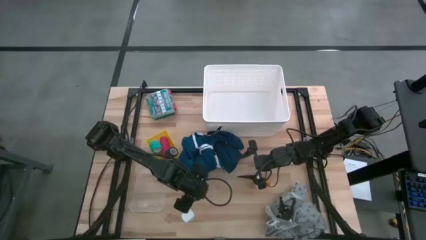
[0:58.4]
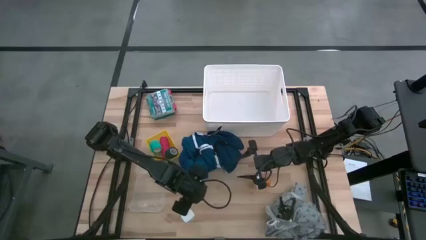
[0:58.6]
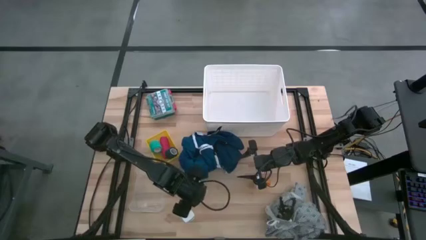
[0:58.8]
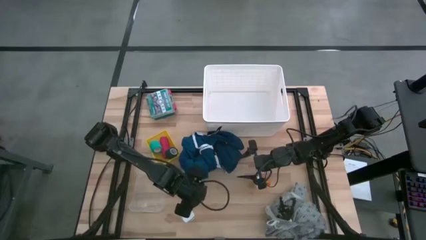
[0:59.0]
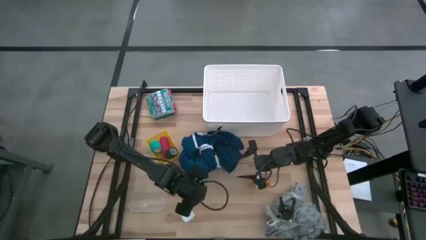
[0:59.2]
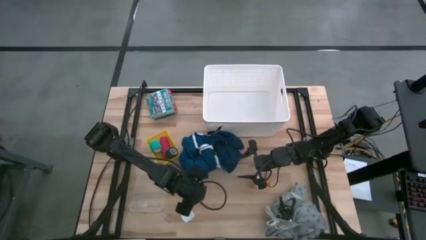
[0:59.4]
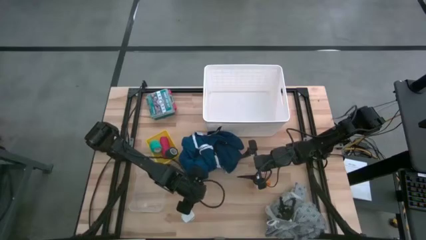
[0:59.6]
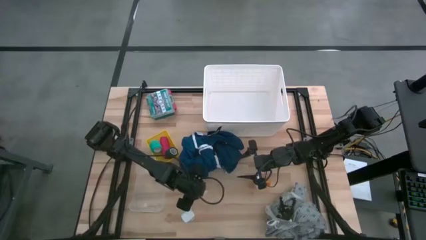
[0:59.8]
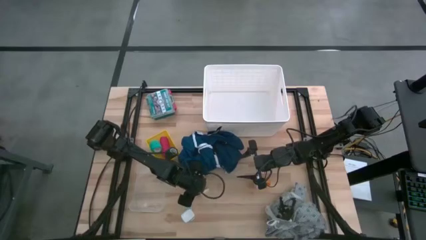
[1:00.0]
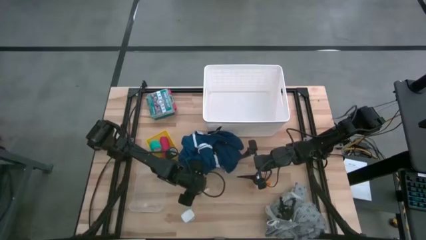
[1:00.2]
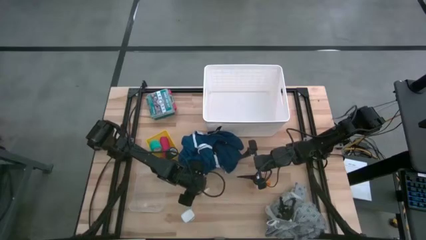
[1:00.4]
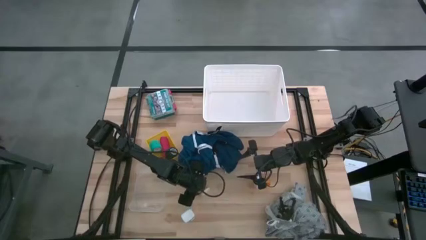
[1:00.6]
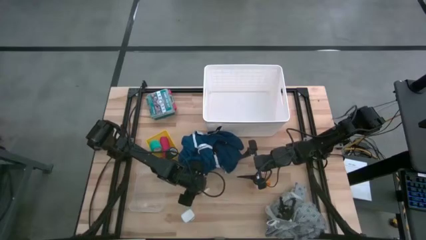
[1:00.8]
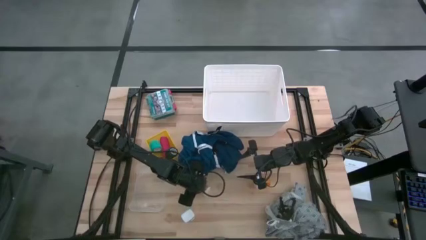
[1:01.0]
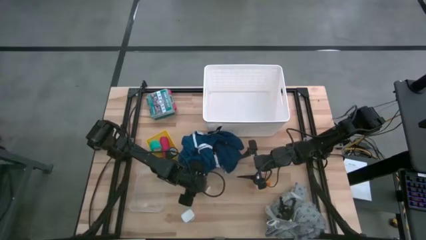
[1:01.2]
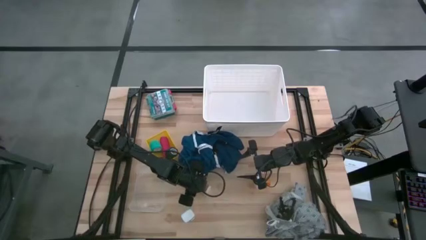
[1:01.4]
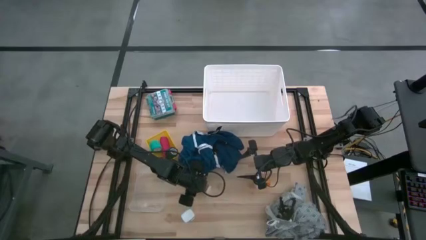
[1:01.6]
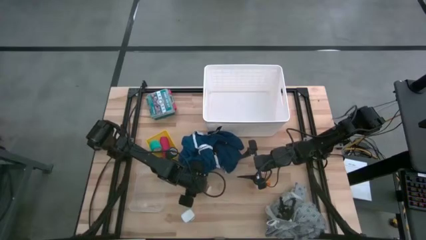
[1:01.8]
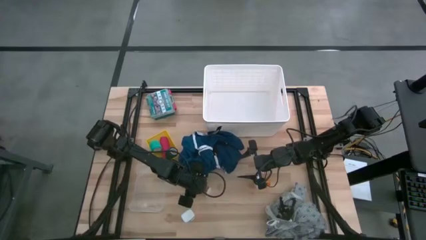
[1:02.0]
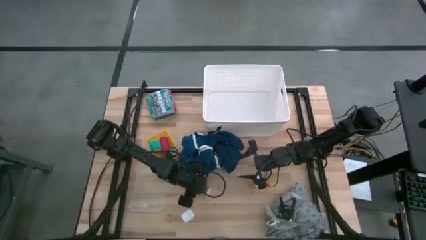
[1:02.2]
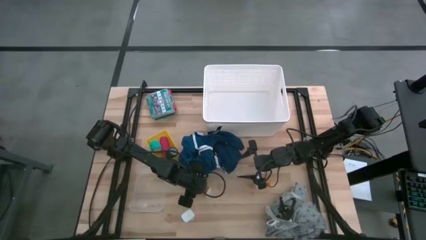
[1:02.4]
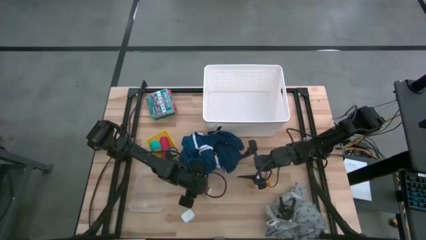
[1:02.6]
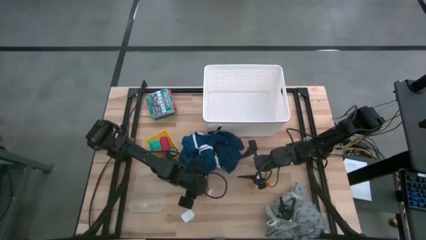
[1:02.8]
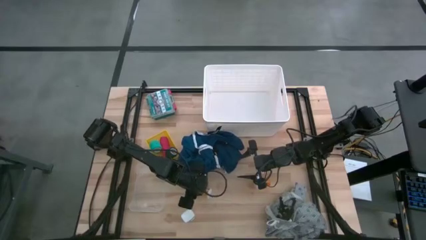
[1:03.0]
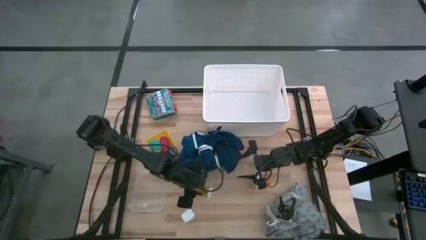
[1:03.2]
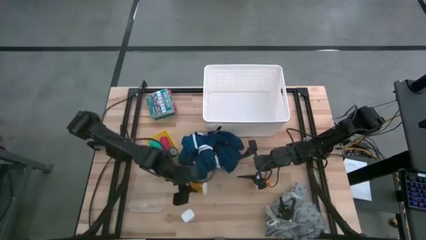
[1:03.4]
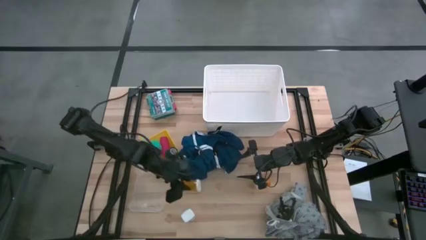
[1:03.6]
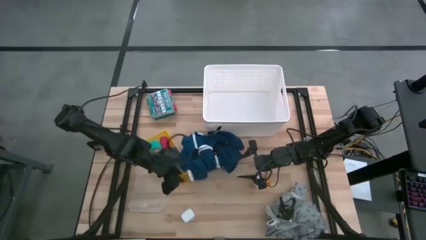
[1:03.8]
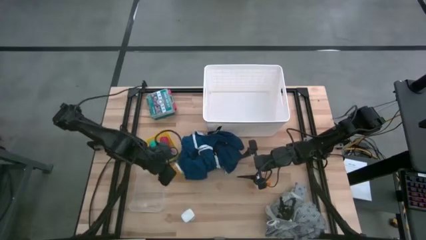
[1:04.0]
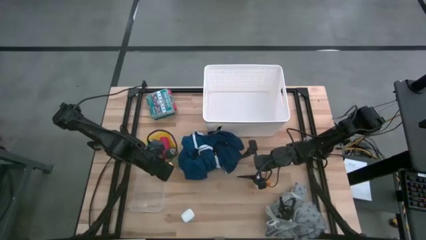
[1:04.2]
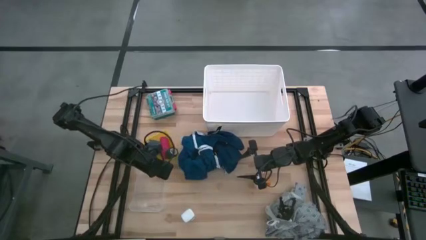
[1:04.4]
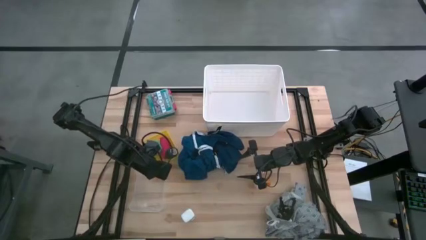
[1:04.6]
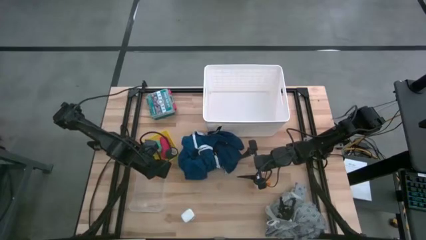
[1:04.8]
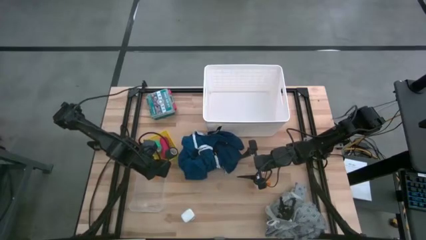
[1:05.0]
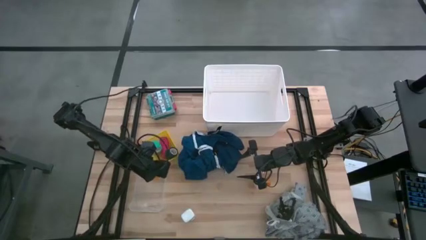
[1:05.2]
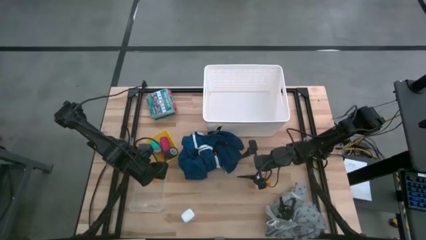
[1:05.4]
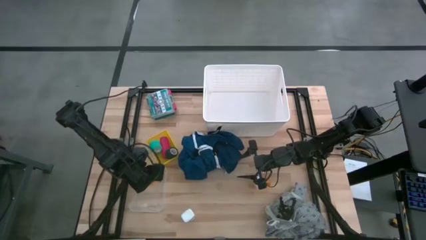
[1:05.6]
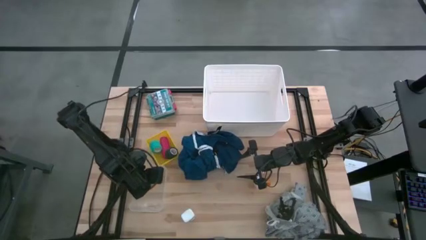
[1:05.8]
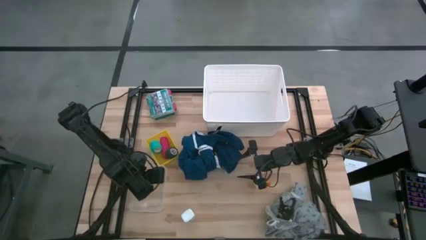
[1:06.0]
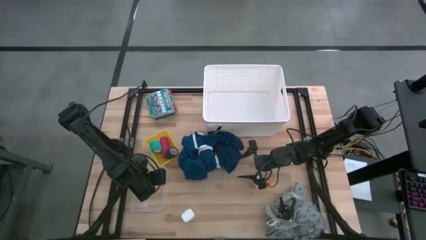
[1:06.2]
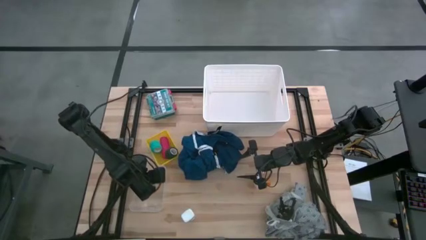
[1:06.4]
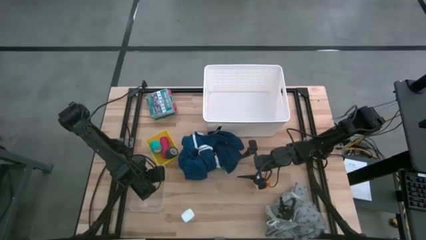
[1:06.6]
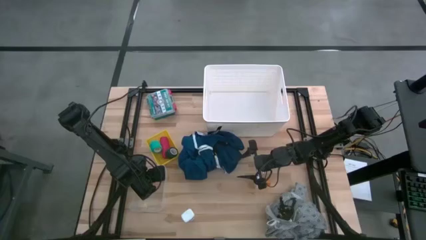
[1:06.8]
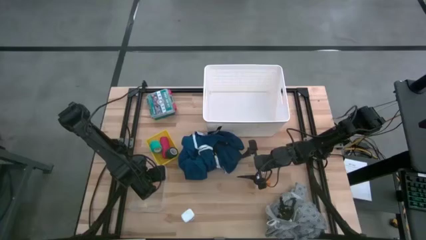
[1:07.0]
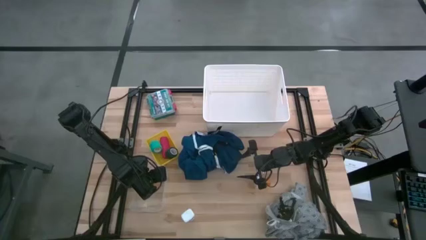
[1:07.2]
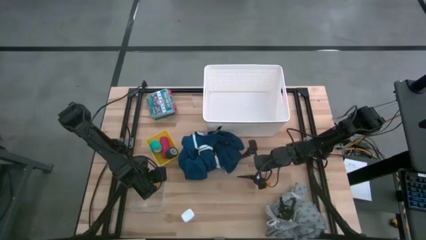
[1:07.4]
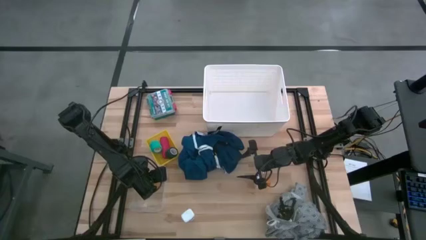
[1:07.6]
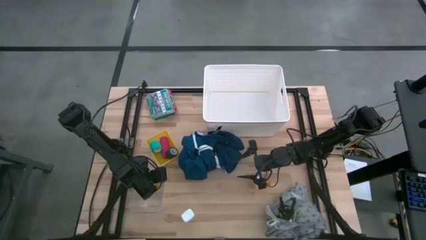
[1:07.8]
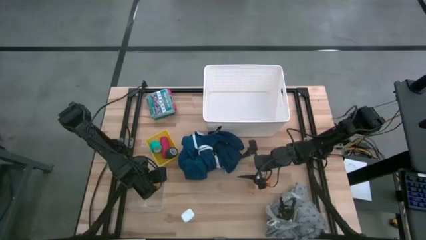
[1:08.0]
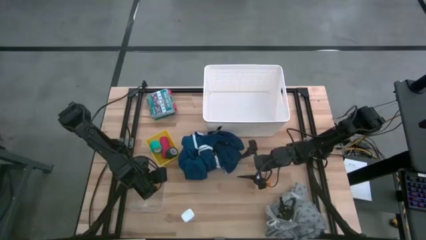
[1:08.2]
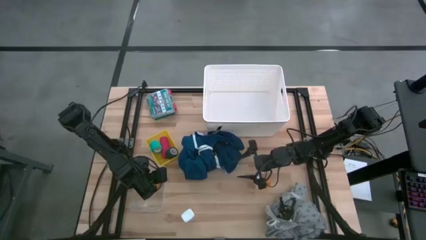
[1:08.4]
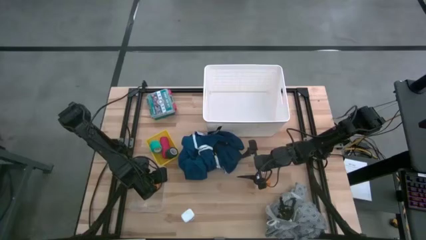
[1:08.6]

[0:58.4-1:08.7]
Task: Pick & place medical supplies in basket/bin
Put the left orange pill bottle into the transparent bin

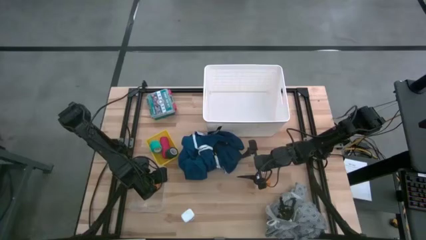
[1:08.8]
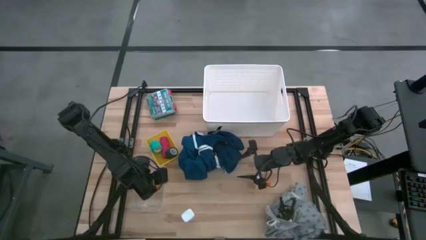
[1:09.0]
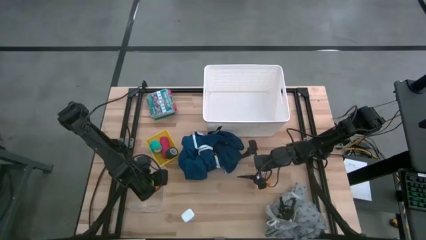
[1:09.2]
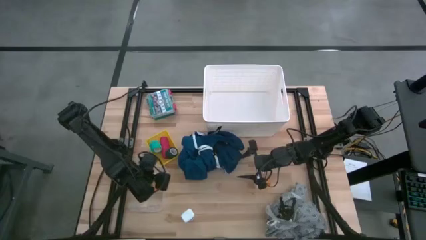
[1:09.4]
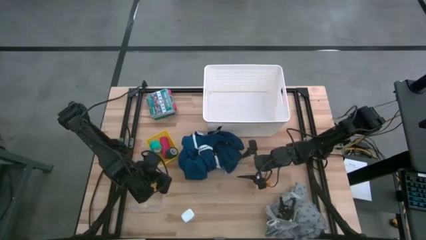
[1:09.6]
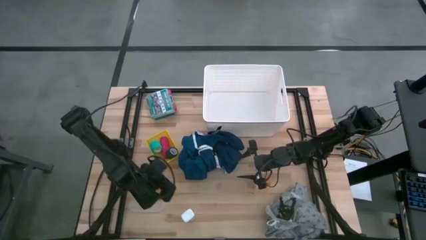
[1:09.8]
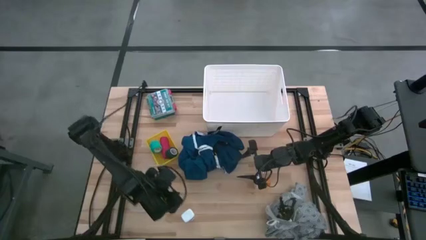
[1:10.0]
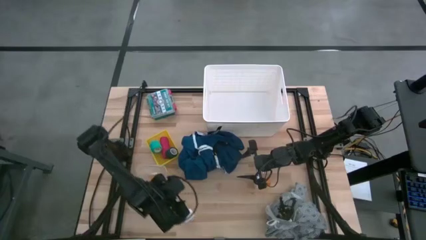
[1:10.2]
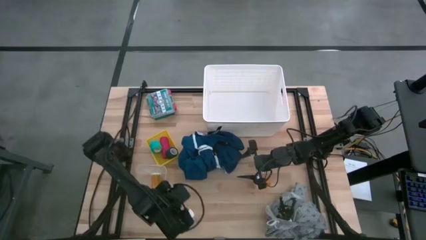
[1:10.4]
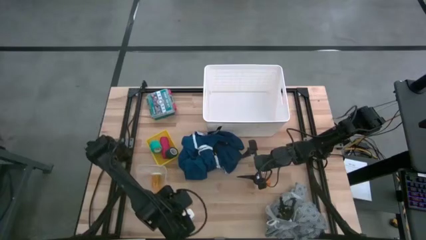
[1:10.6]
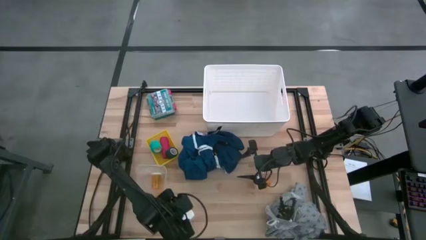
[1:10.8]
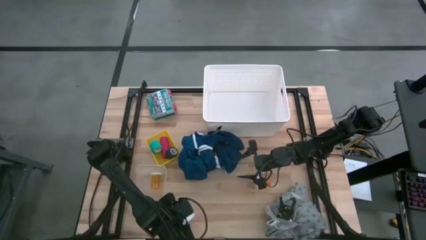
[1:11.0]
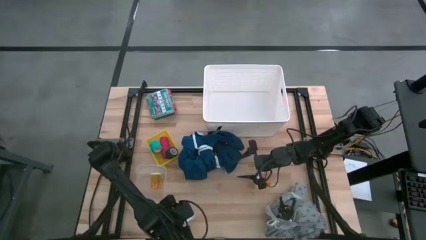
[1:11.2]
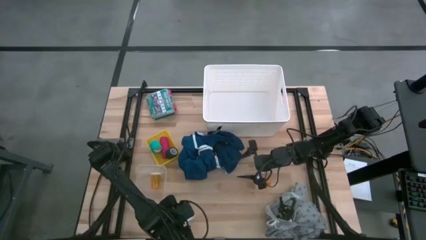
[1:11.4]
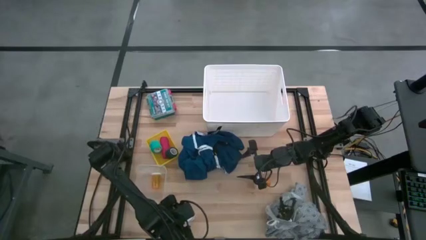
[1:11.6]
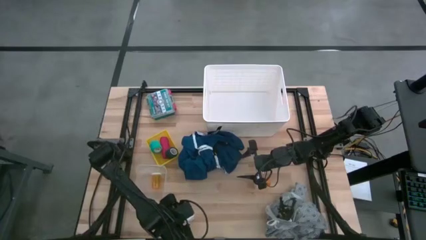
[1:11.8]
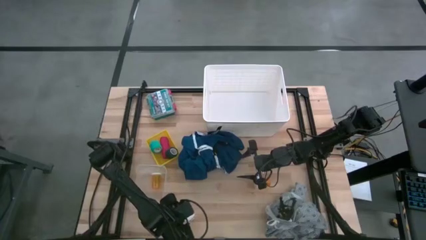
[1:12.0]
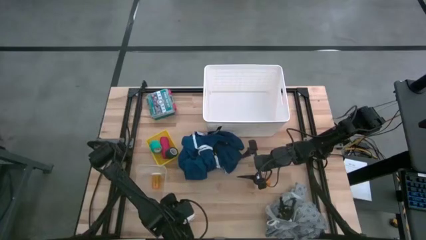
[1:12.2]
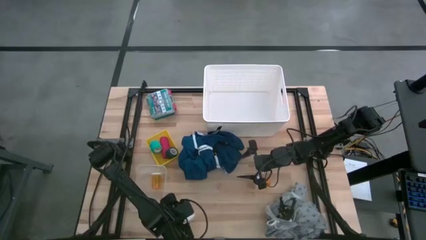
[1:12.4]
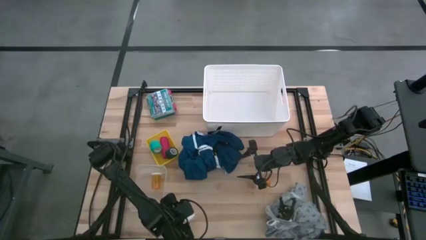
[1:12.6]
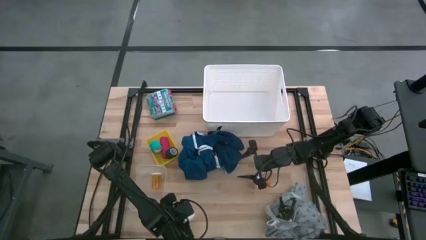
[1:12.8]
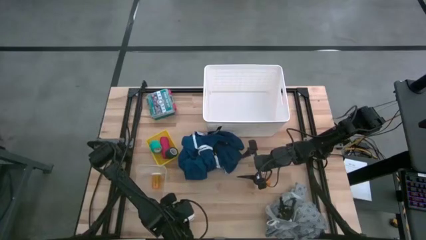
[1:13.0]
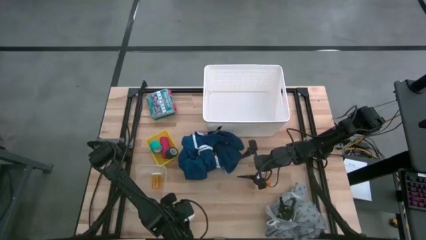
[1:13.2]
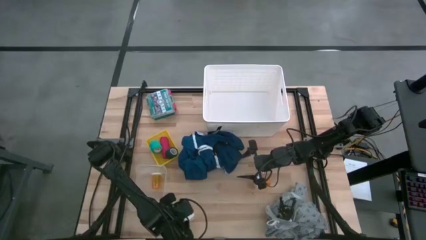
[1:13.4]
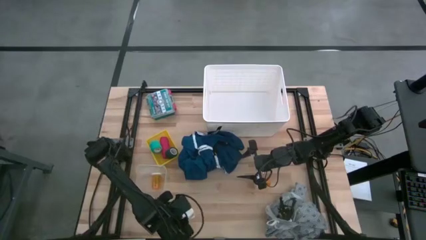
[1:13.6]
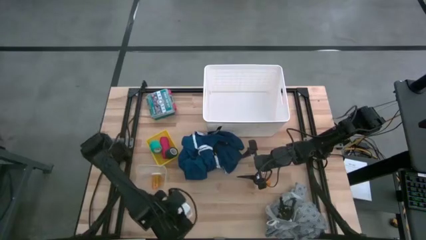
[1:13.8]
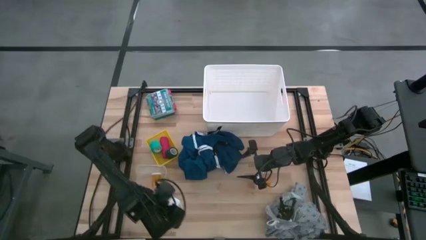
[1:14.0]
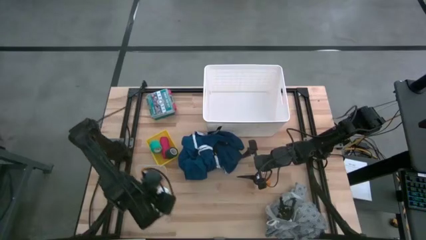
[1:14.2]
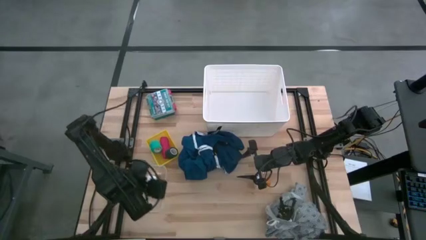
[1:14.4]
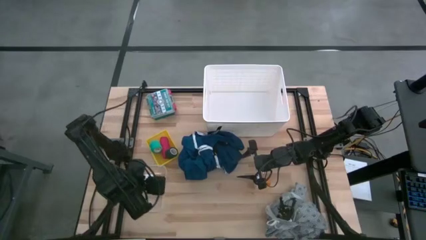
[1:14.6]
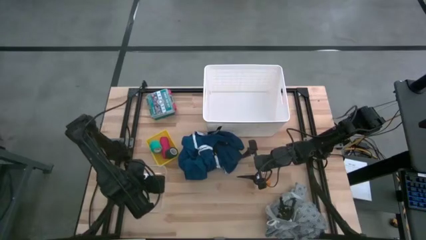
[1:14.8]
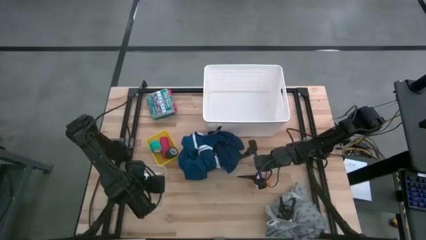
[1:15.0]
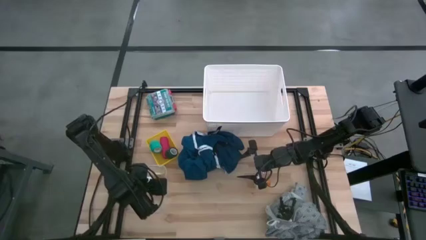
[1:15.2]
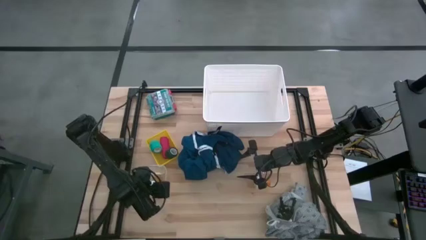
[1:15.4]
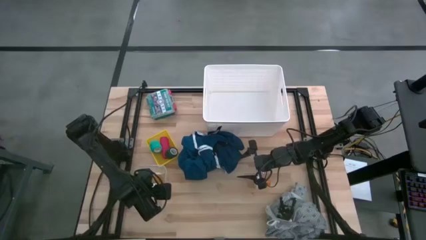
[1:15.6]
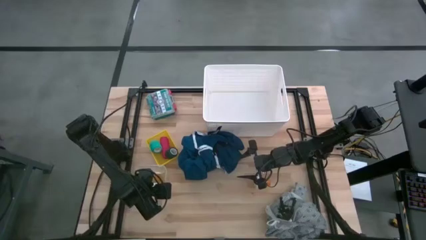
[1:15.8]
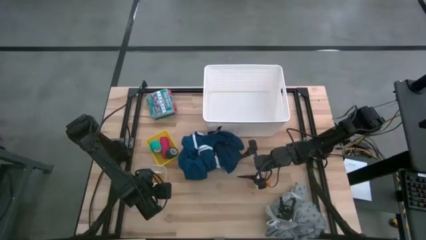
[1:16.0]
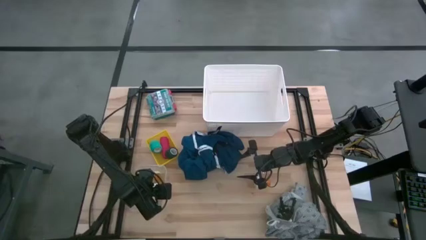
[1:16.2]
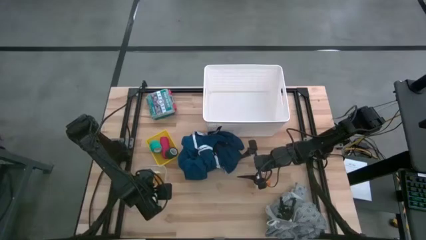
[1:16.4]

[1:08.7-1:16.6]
Put the white and blue pill bottle into the transparent bin
